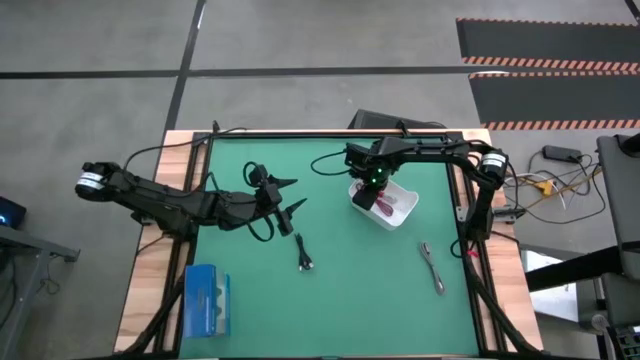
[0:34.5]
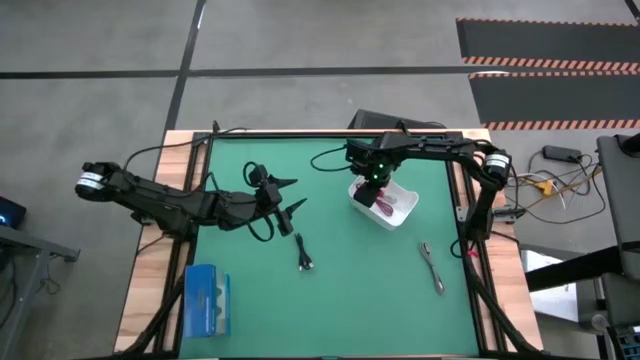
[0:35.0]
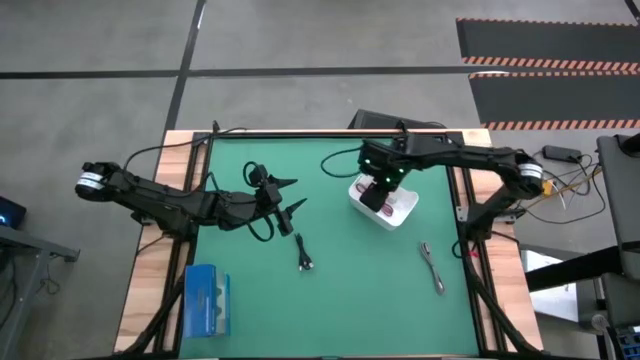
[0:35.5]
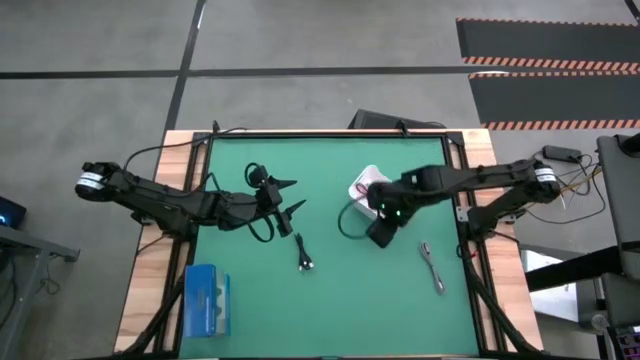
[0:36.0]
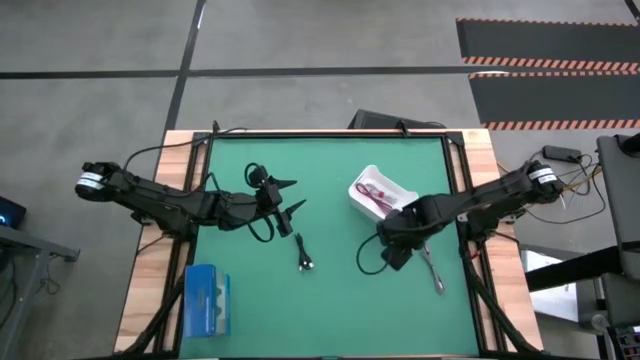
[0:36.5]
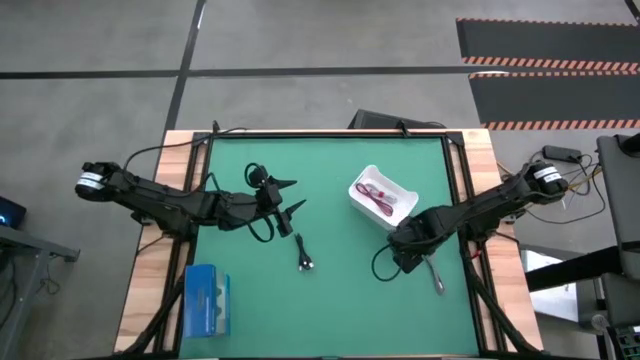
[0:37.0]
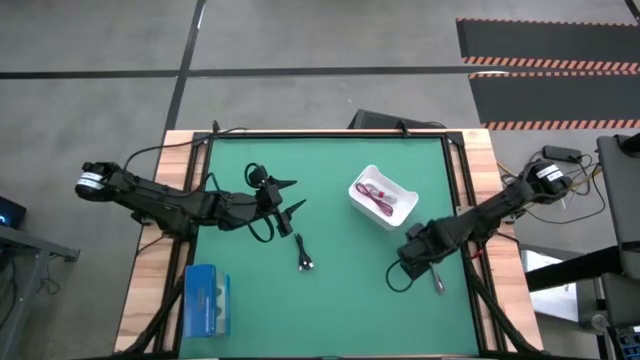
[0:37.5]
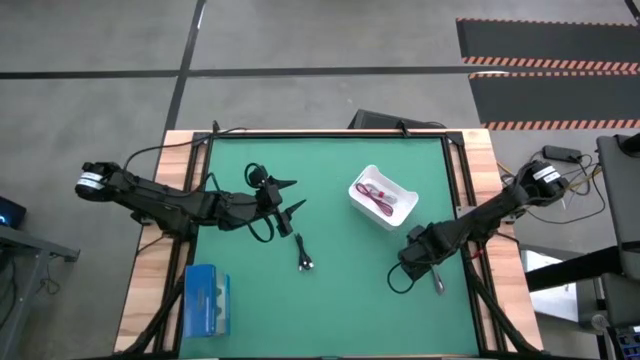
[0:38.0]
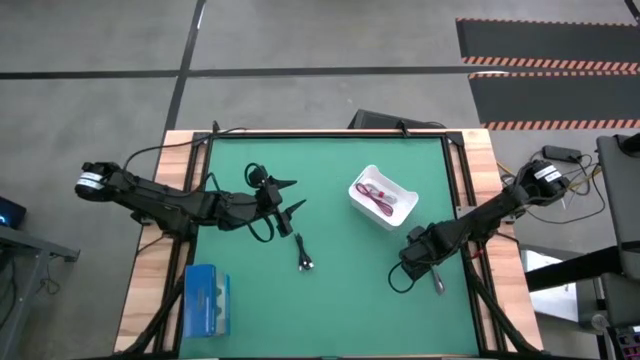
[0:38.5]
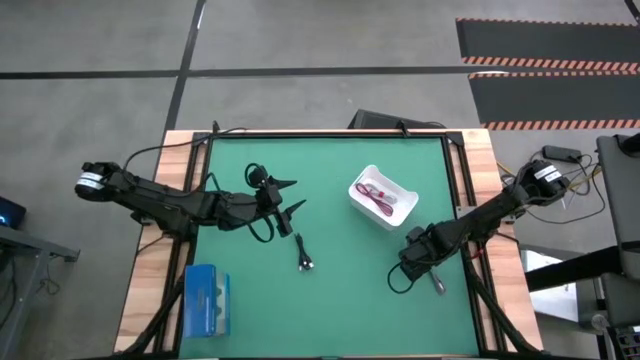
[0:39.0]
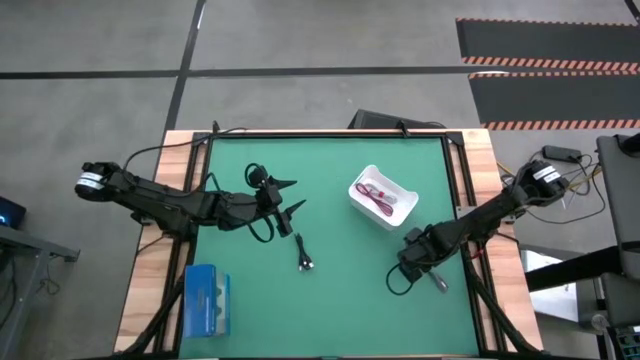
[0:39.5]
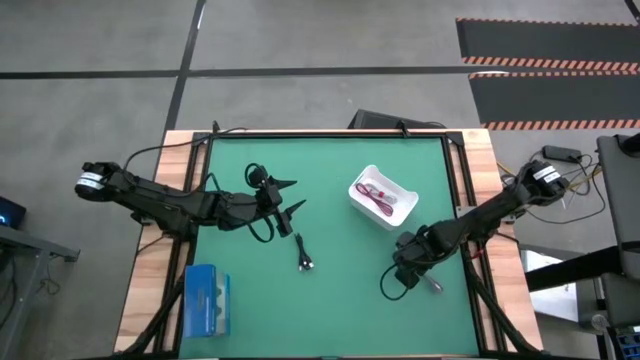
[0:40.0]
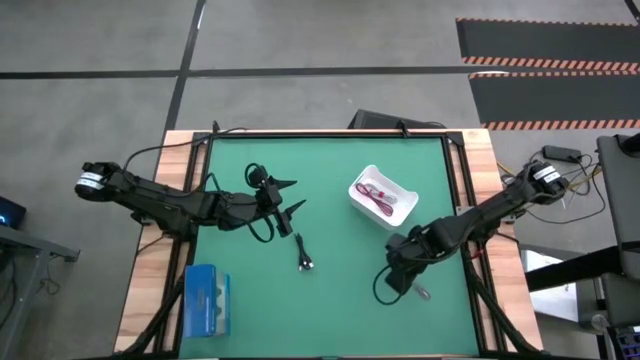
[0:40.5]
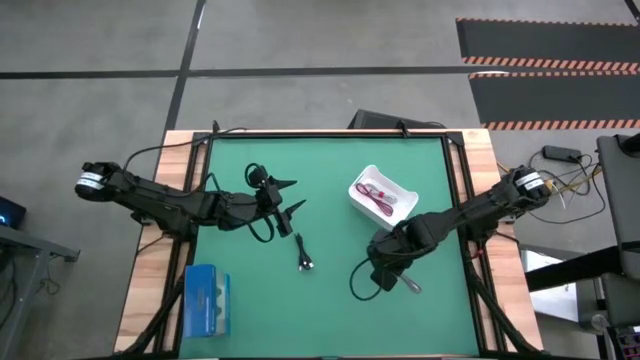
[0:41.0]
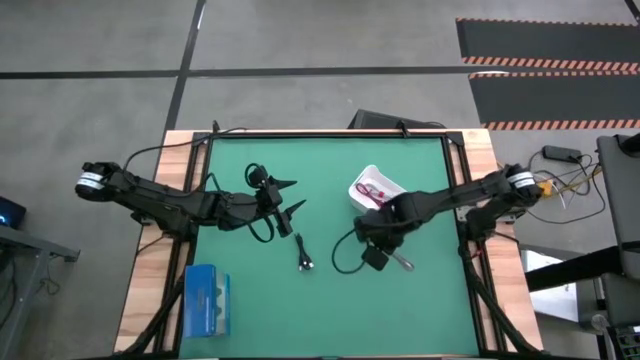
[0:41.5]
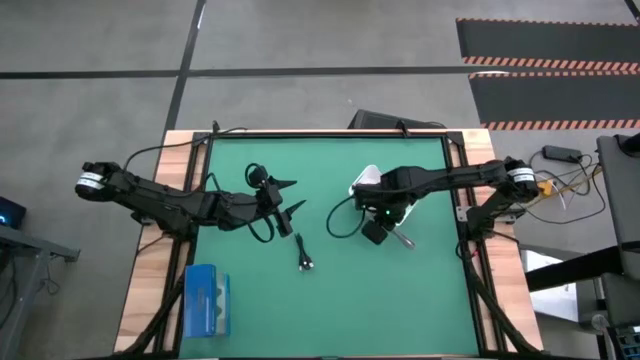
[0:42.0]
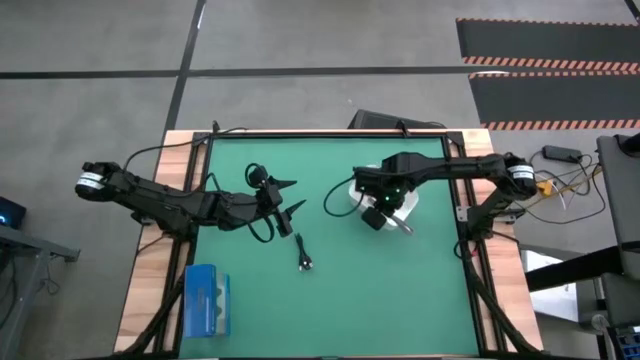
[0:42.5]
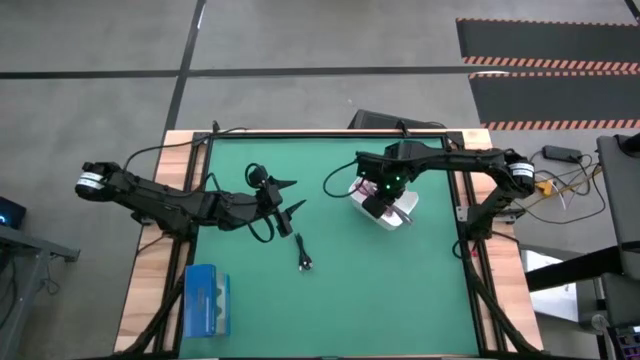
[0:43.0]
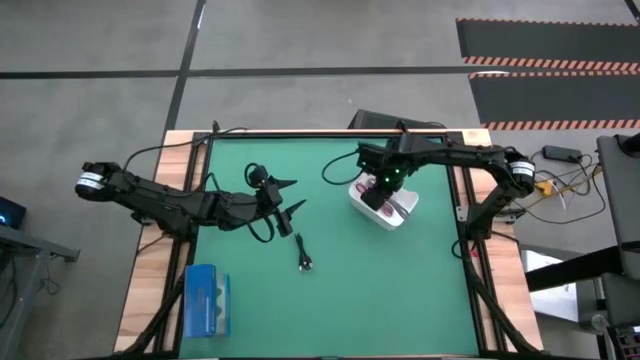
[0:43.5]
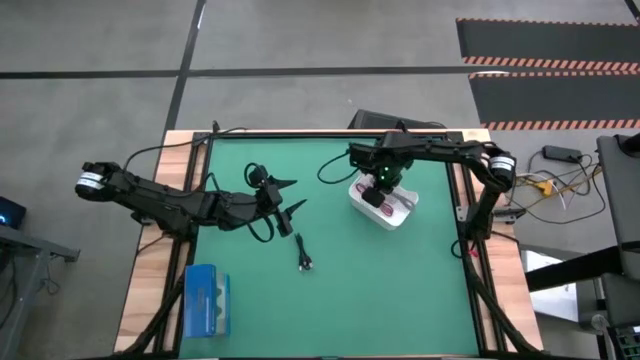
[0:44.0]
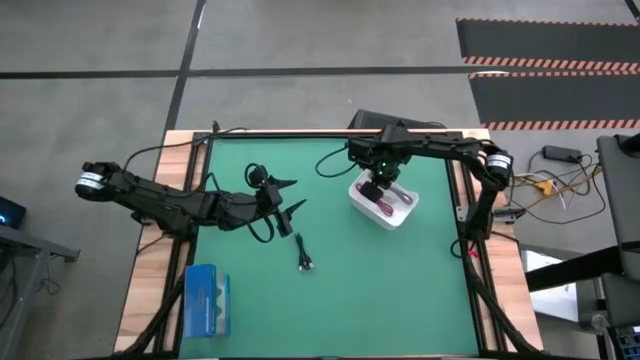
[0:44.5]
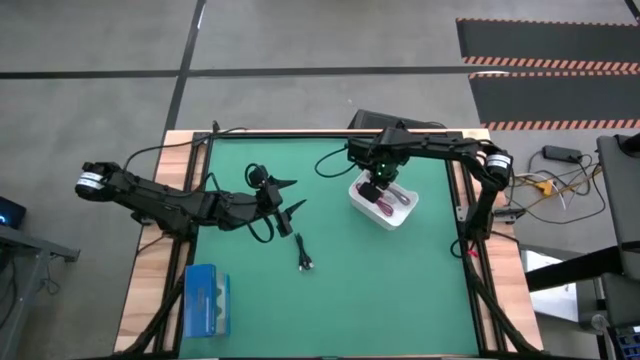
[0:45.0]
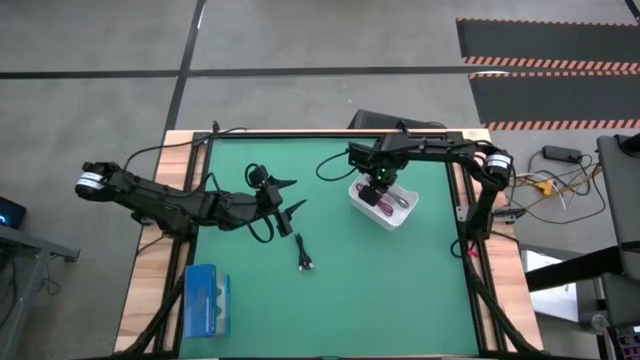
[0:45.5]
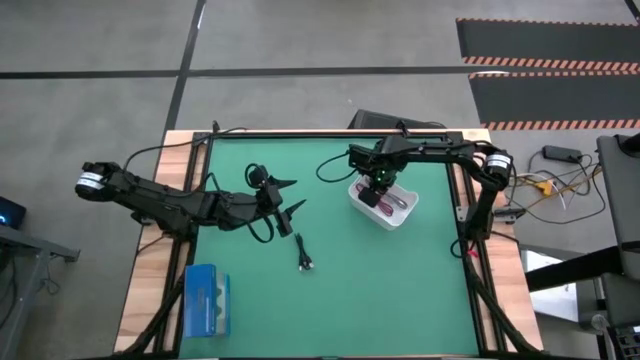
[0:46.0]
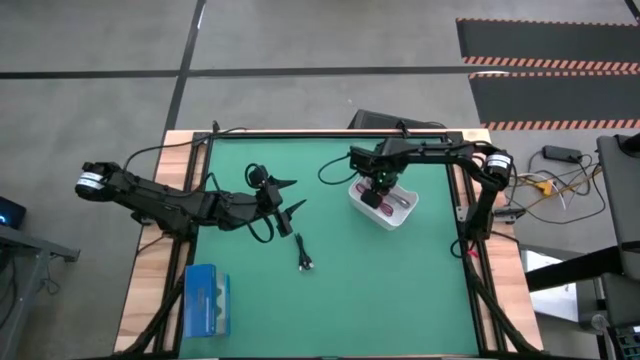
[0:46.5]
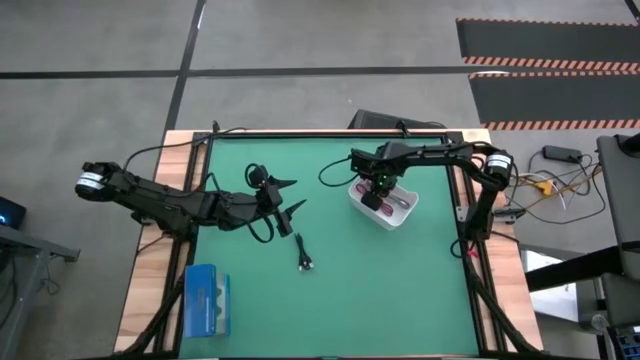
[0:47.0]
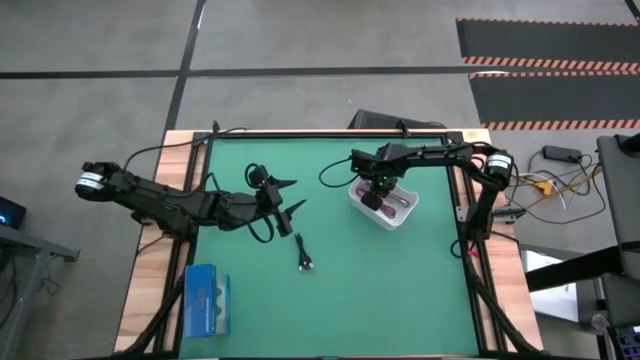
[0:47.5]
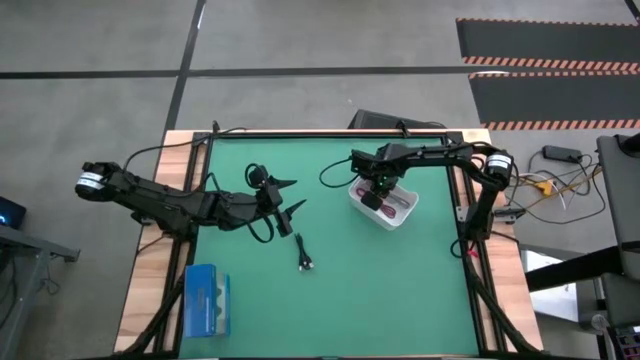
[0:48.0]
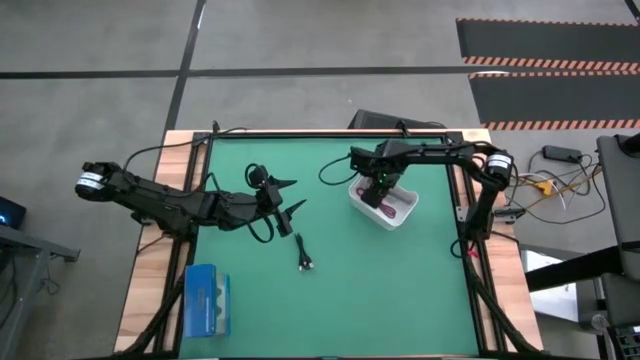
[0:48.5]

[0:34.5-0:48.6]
Task: Pick and place USB-C Cables
Put the black white charger cable into the white bin
